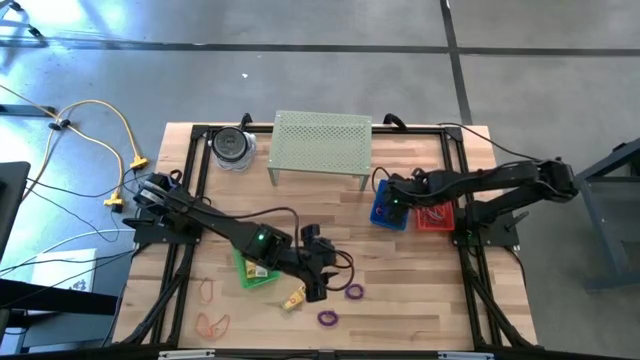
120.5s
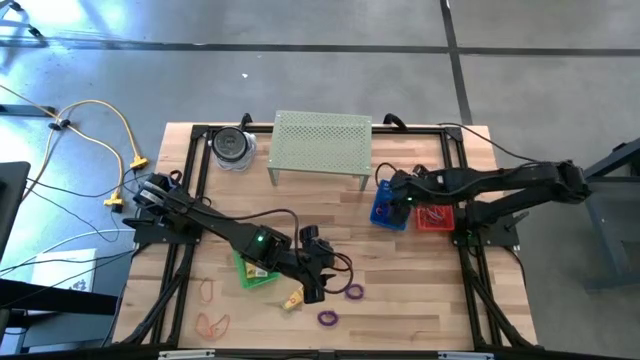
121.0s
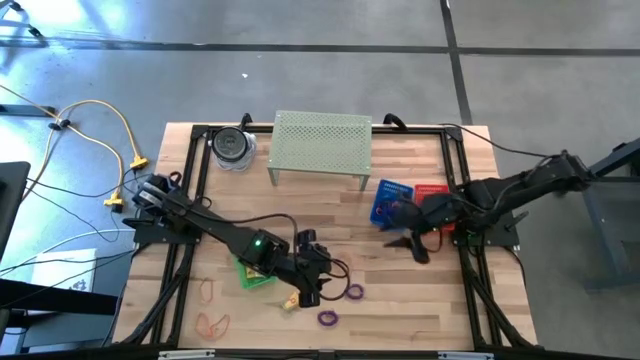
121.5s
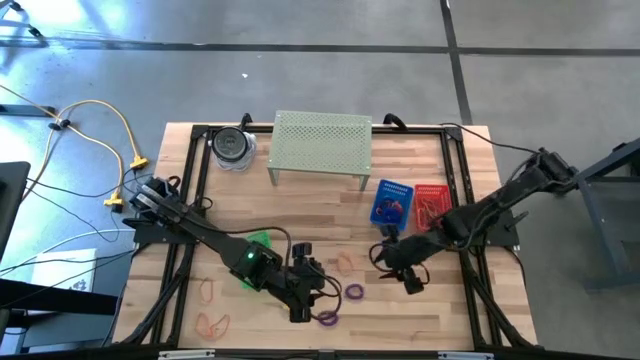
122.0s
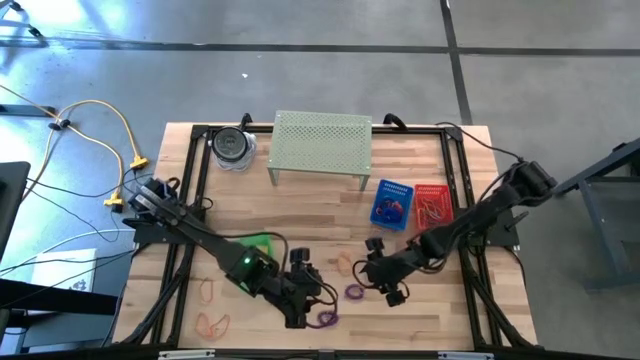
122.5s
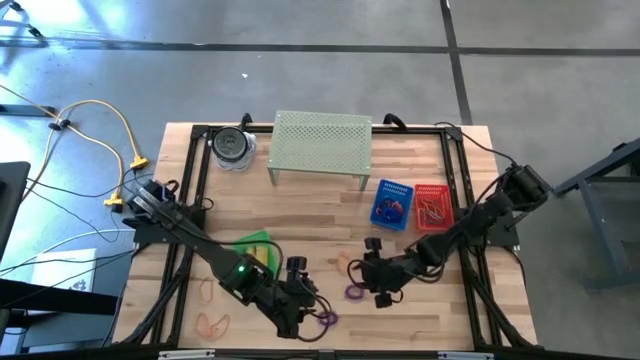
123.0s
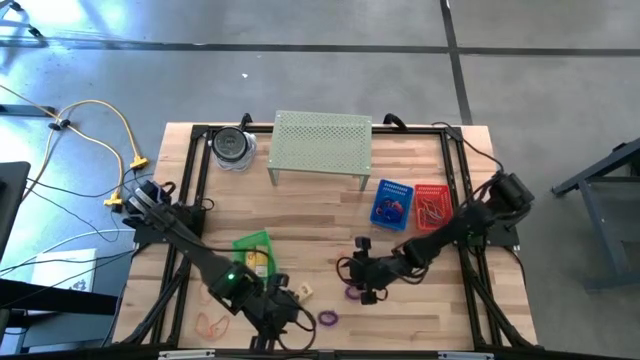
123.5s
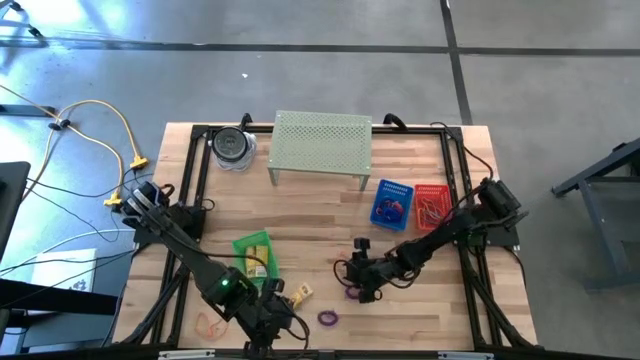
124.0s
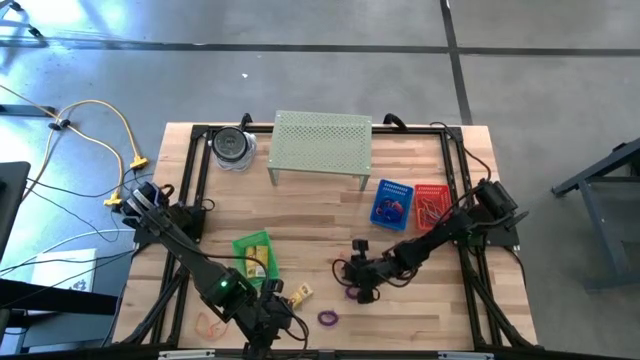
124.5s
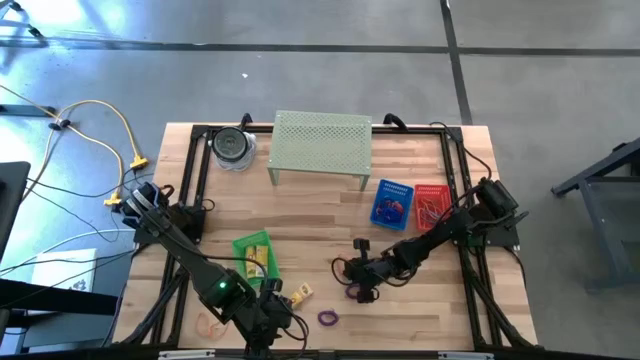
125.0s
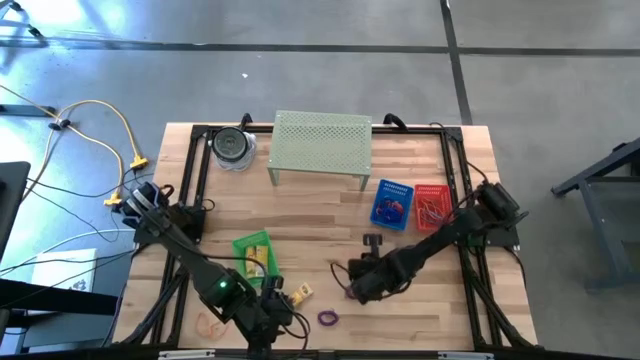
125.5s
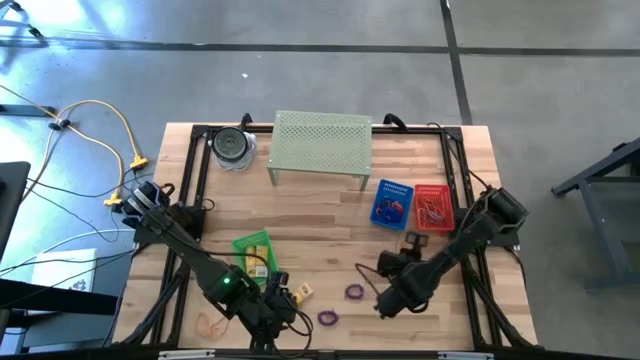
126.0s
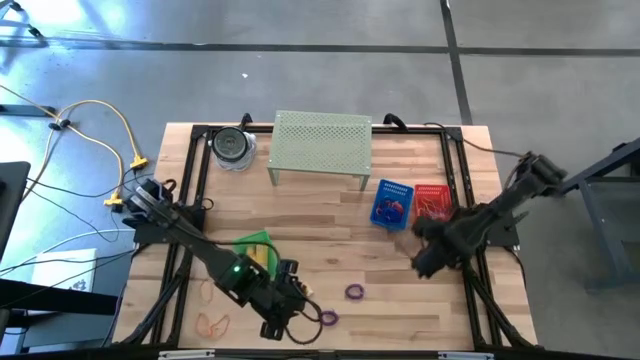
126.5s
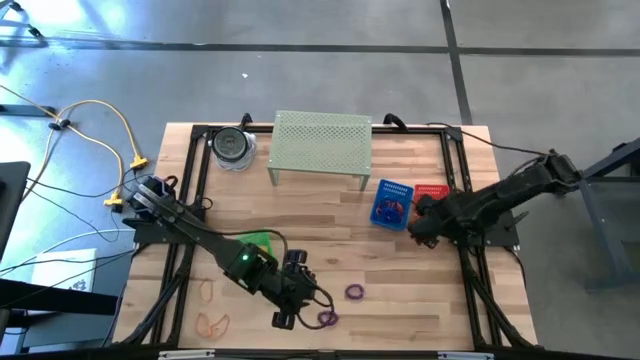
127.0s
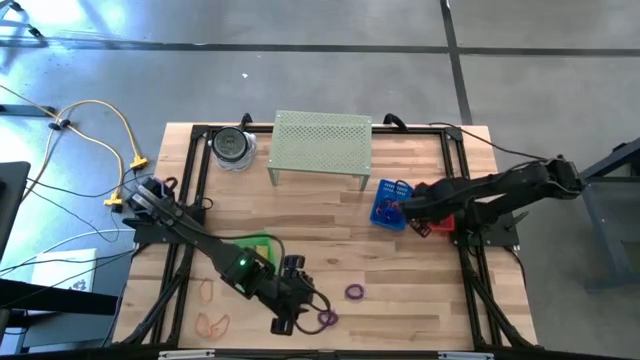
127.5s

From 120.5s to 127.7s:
Task: Pick & Place Office Desk Supplies
Put the orange rubber band into the red bin

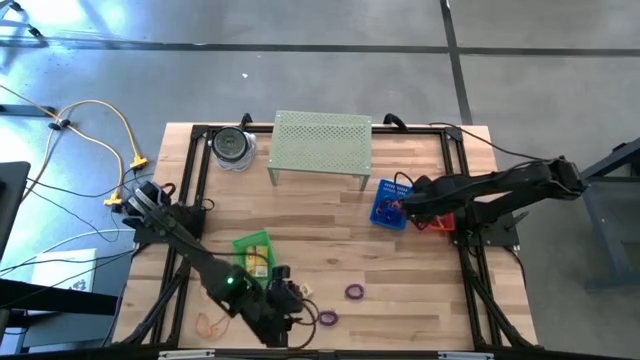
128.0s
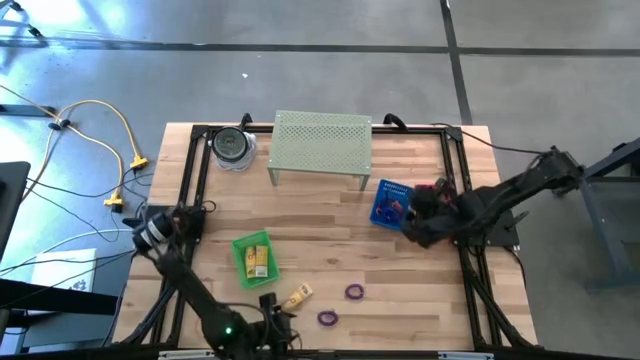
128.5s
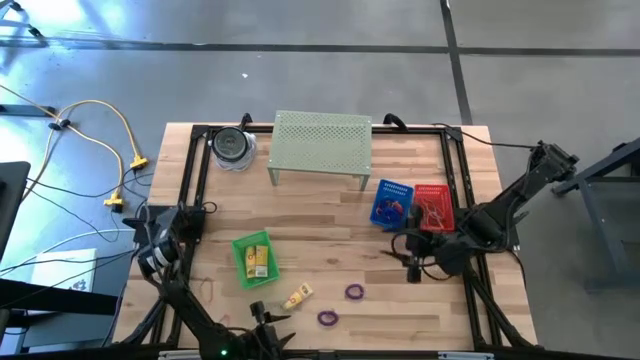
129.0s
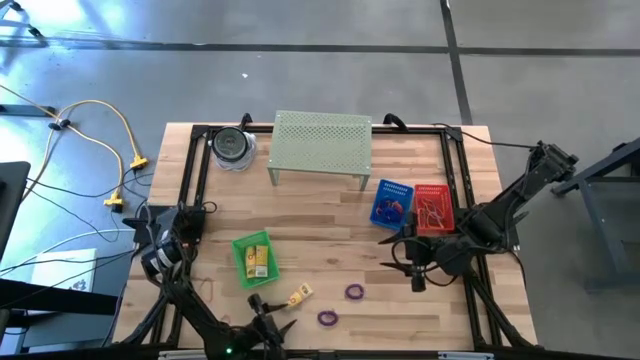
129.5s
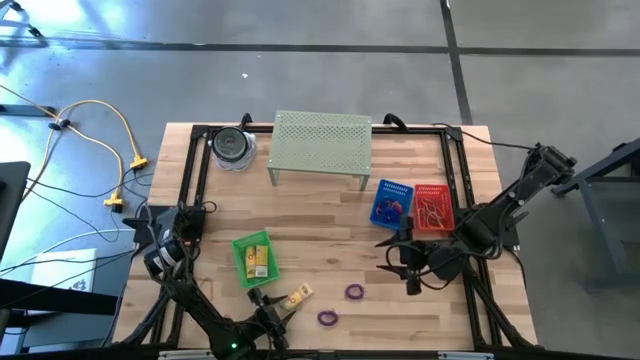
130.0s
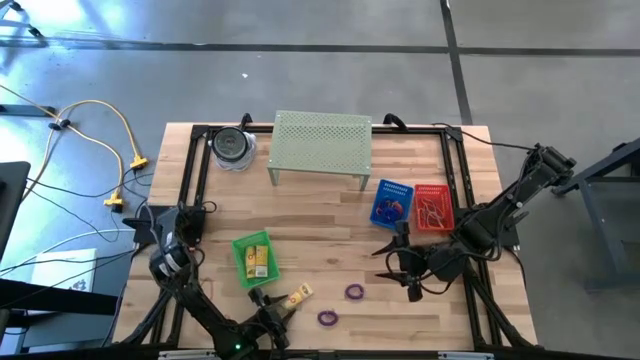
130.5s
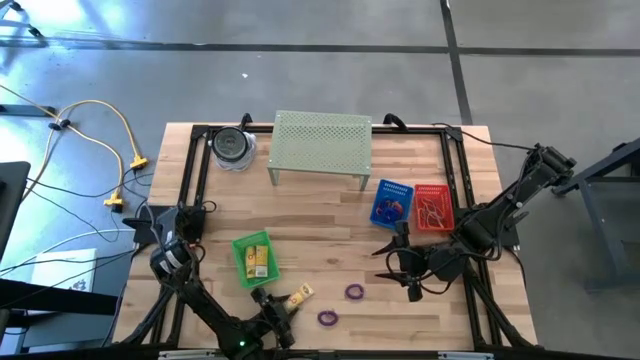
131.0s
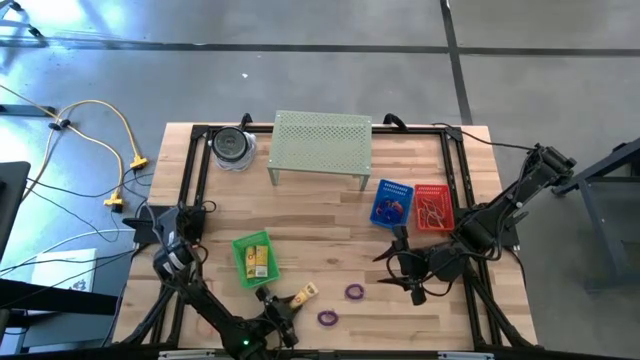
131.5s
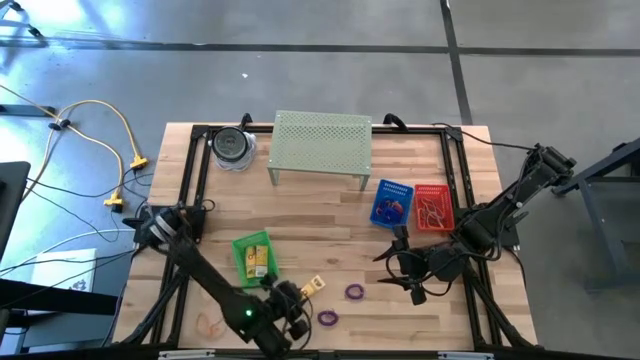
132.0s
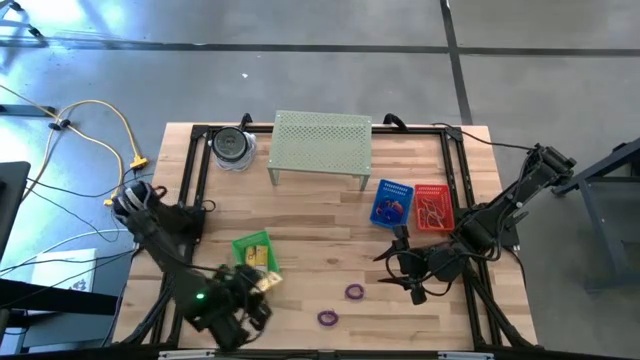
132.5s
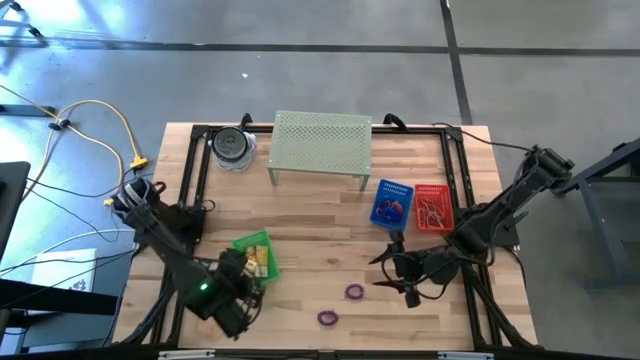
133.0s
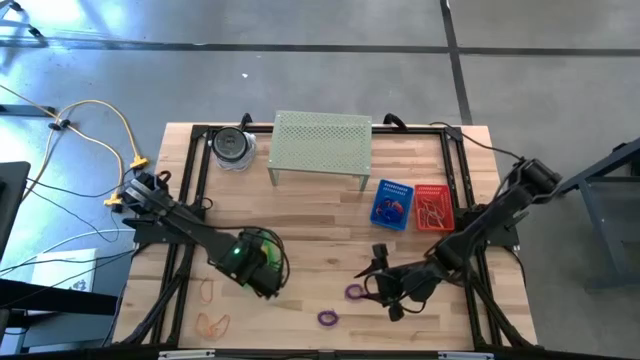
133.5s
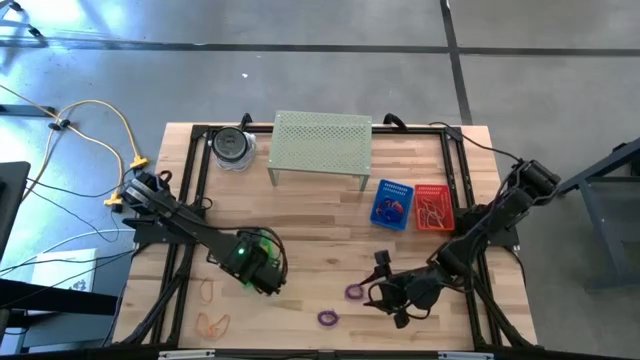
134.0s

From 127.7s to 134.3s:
Put the crayon box into the green bin

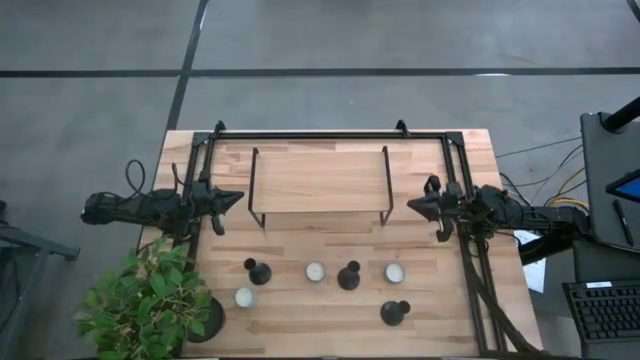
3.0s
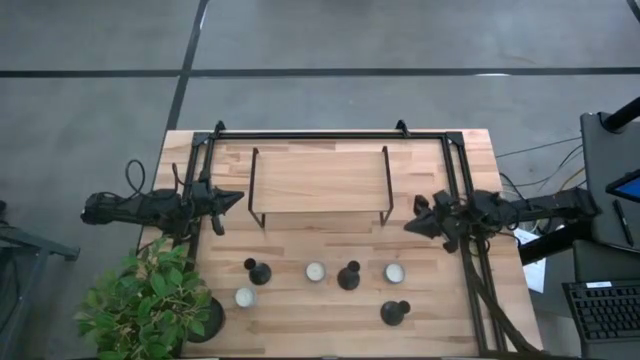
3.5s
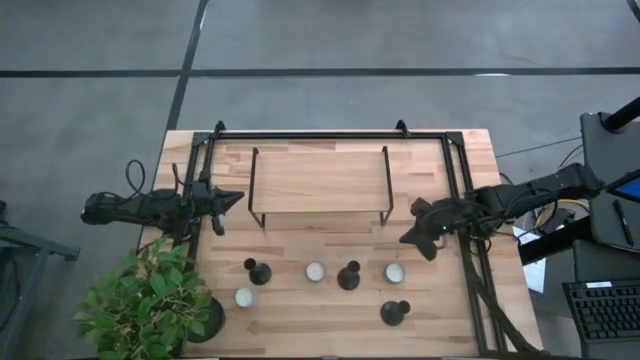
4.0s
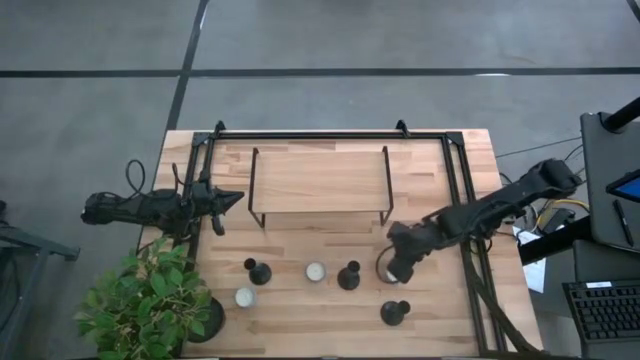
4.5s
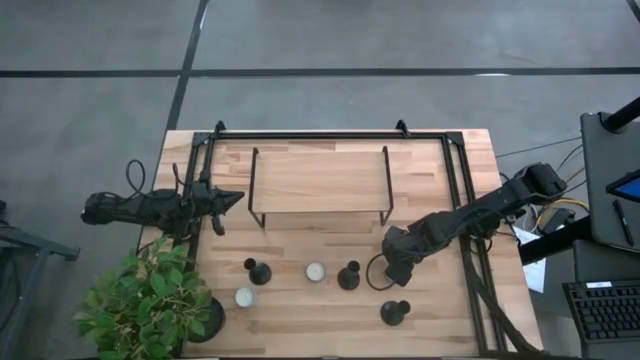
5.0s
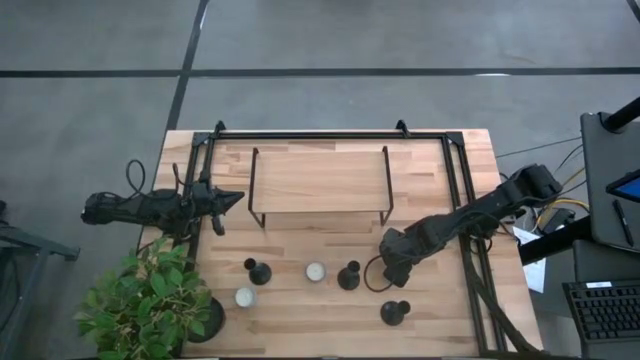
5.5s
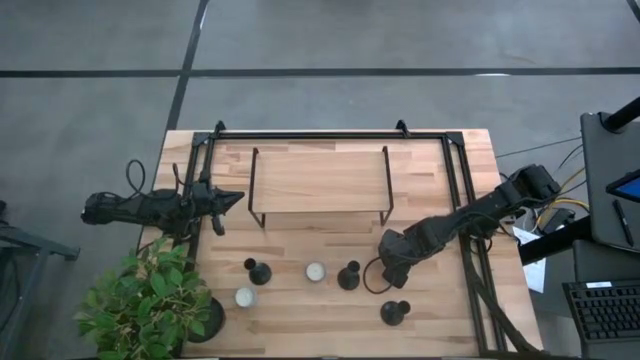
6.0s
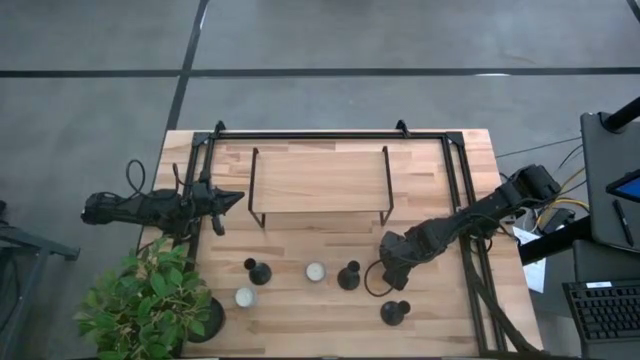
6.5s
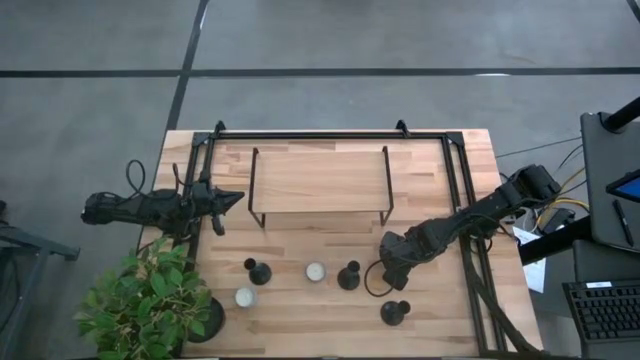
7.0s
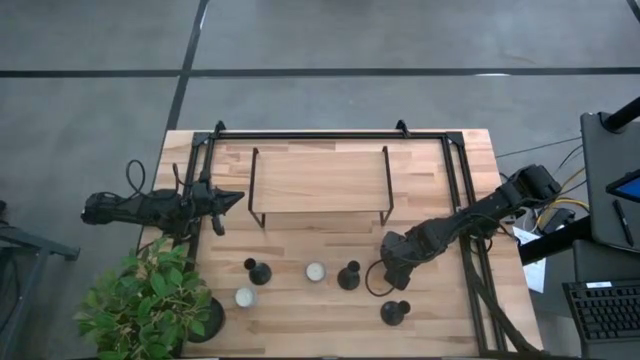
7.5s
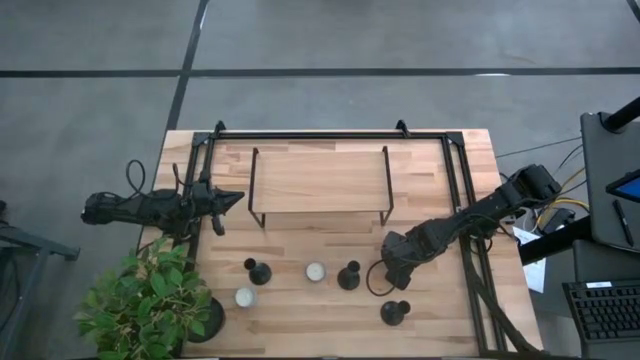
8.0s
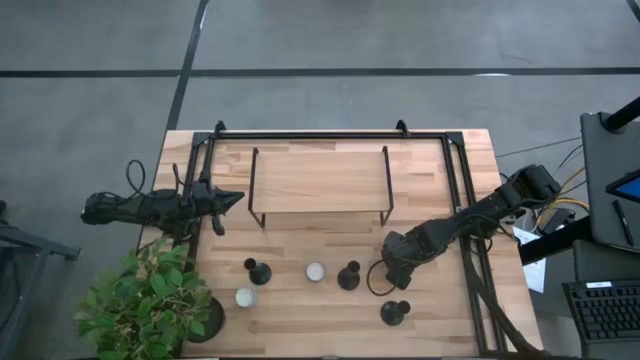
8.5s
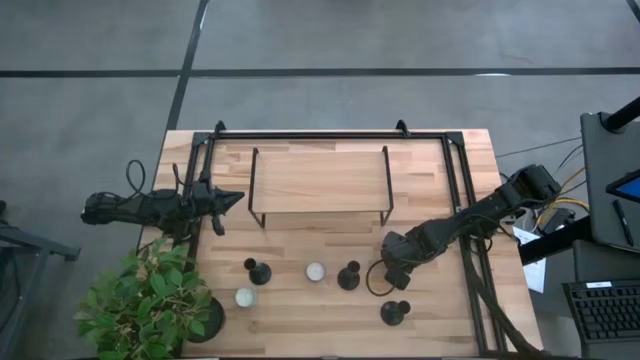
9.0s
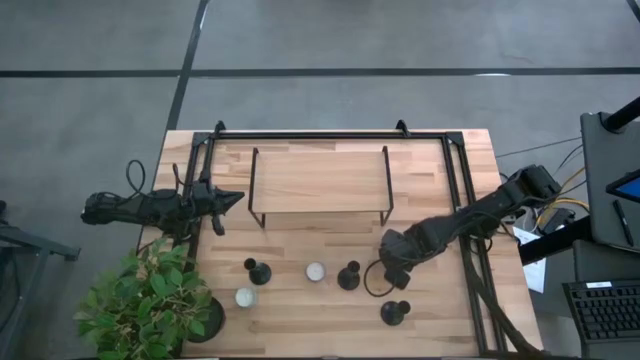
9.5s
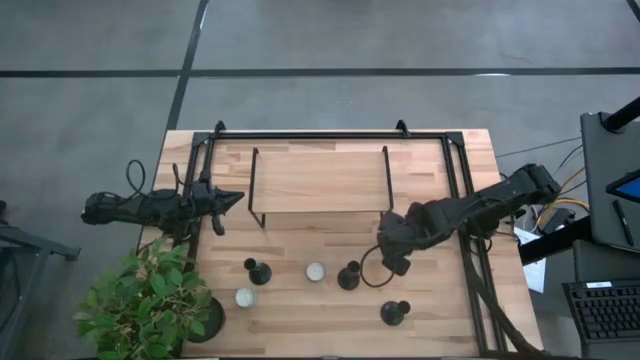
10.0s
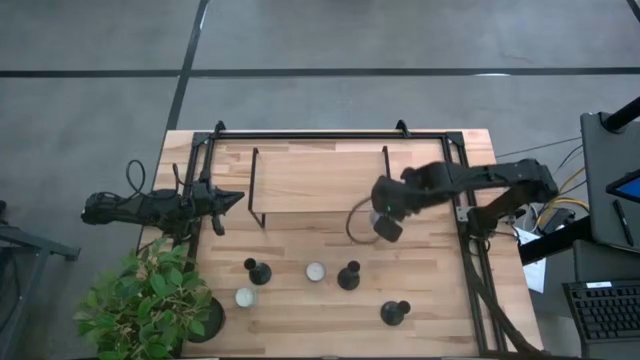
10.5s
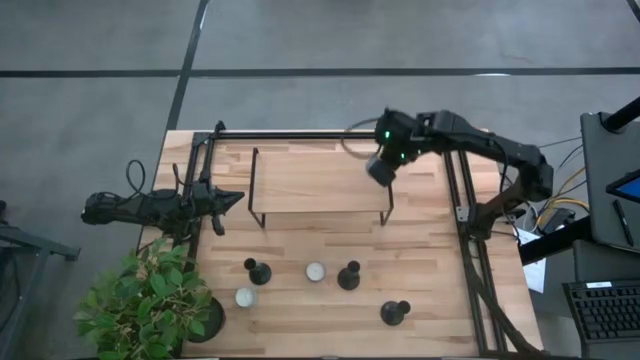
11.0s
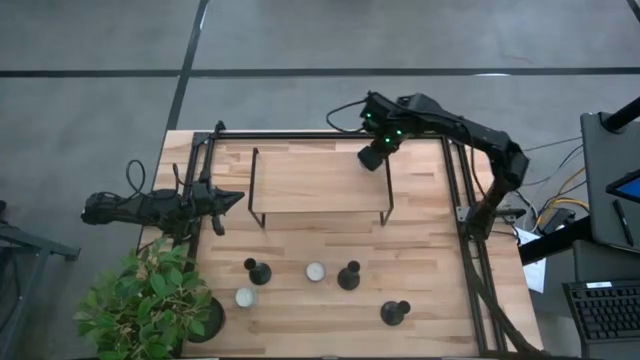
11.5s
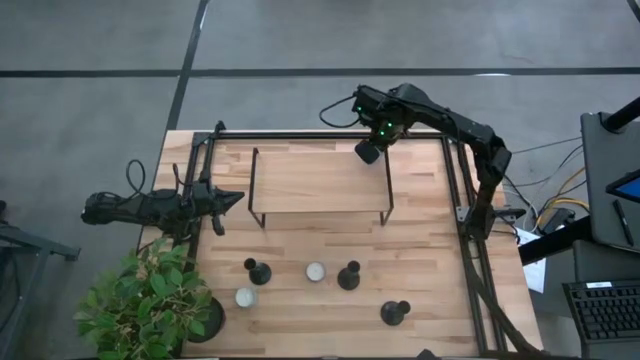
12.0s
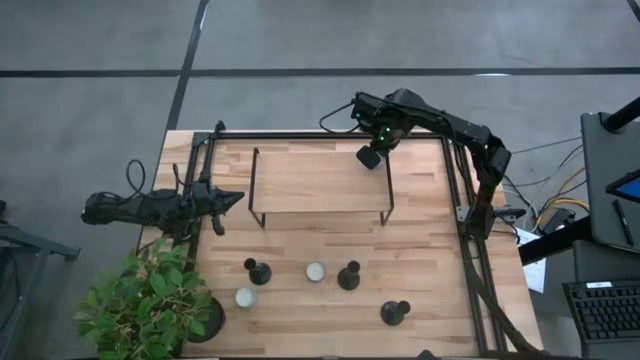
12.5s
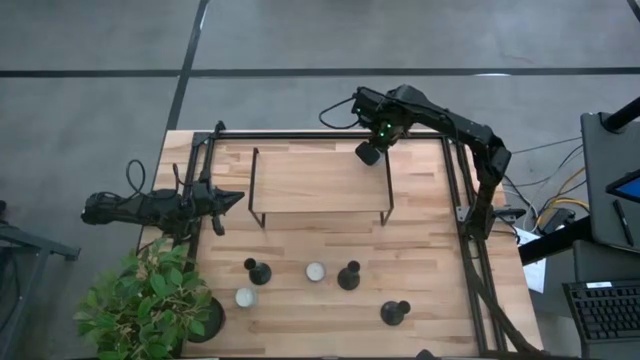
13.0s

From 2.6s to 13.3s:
Task: Pick & Place candle stick holders
Put the blue patterned candle on the shelf
